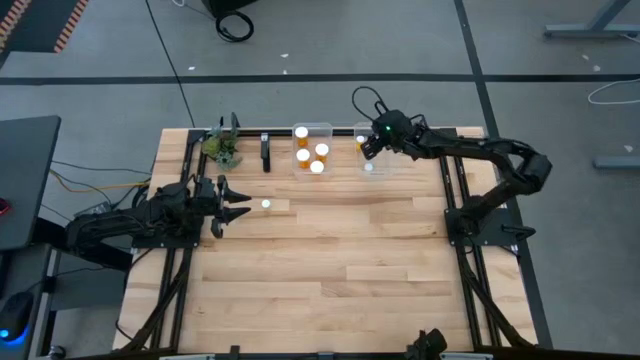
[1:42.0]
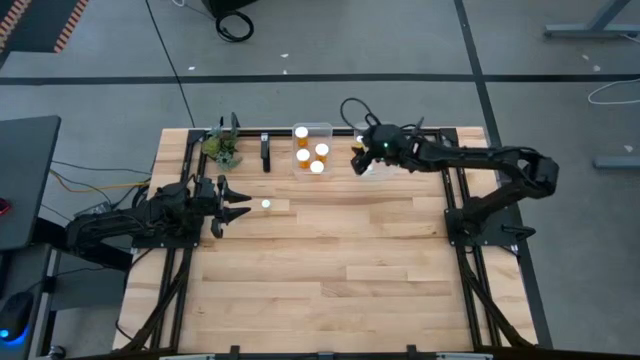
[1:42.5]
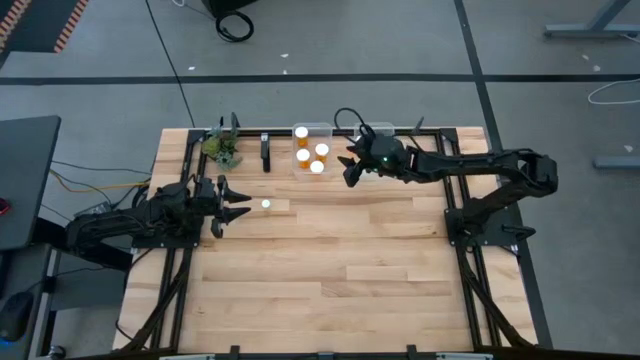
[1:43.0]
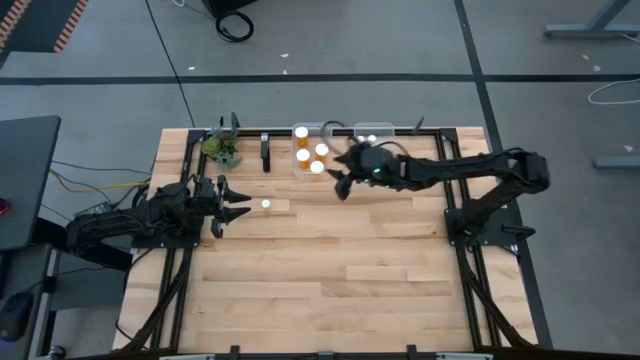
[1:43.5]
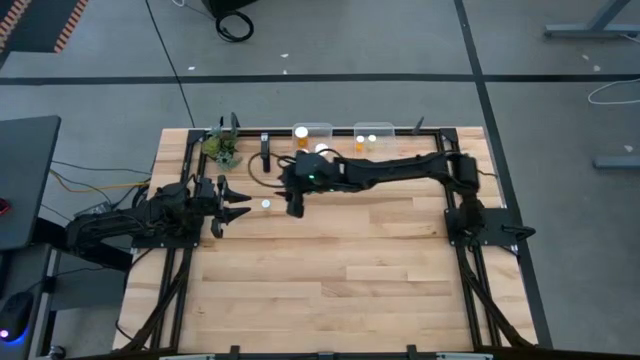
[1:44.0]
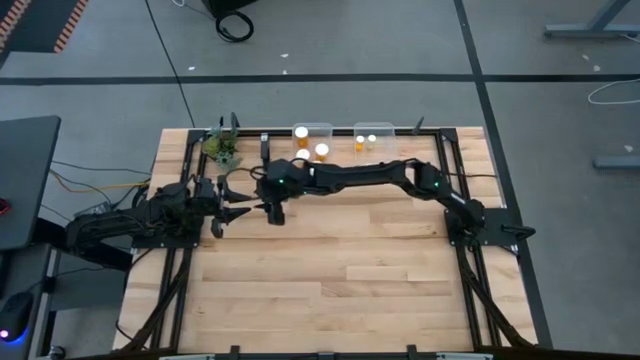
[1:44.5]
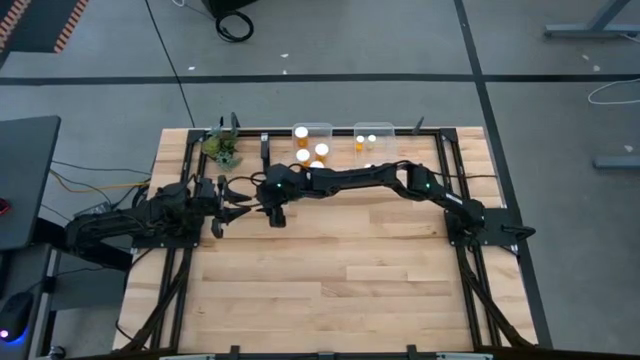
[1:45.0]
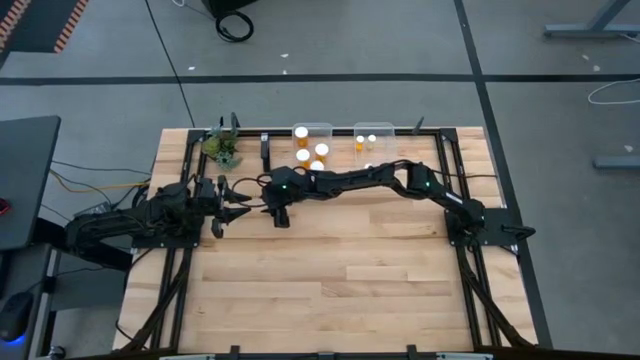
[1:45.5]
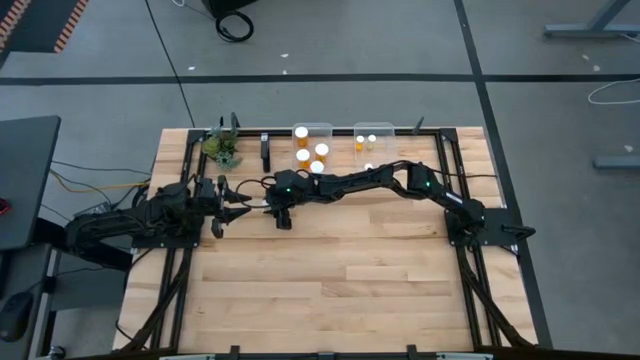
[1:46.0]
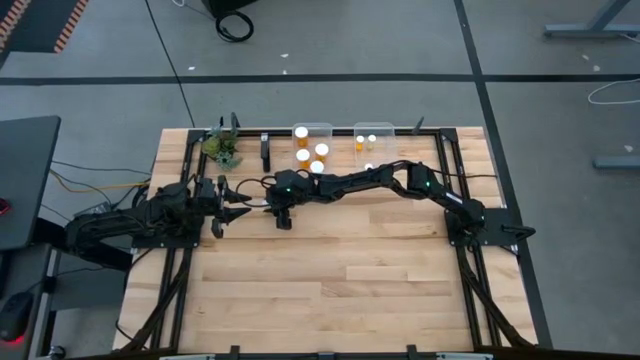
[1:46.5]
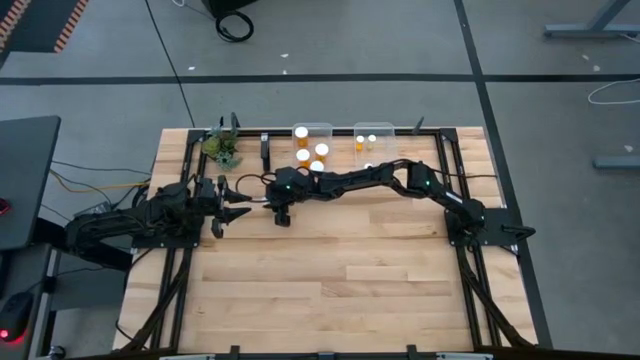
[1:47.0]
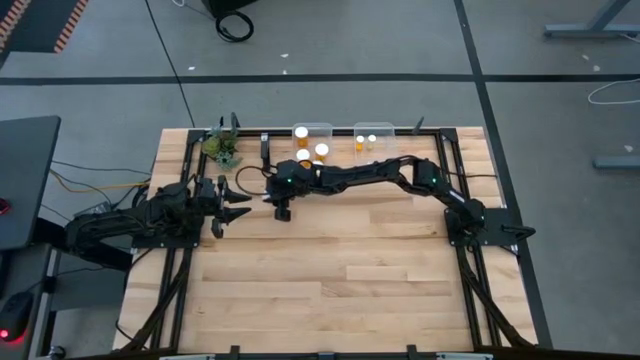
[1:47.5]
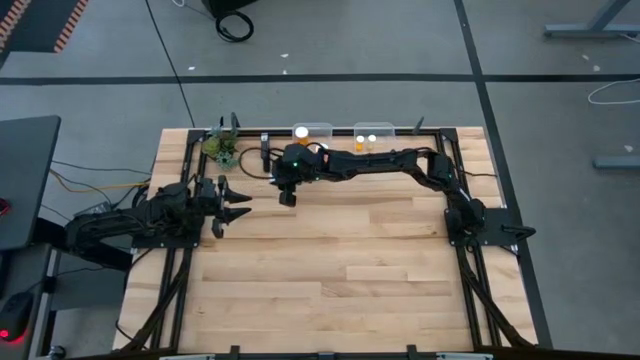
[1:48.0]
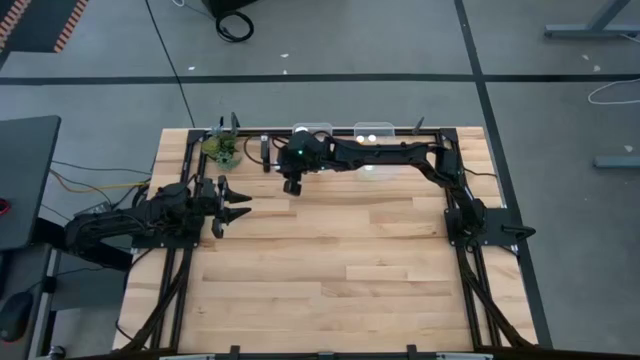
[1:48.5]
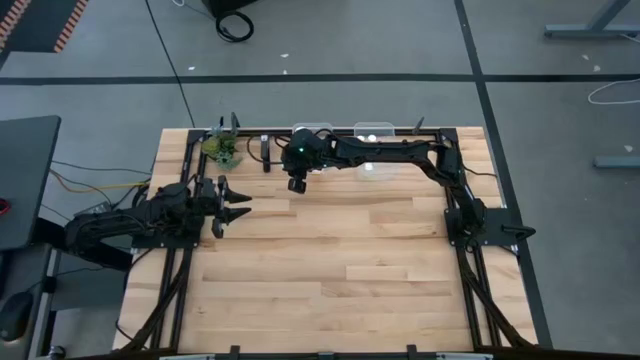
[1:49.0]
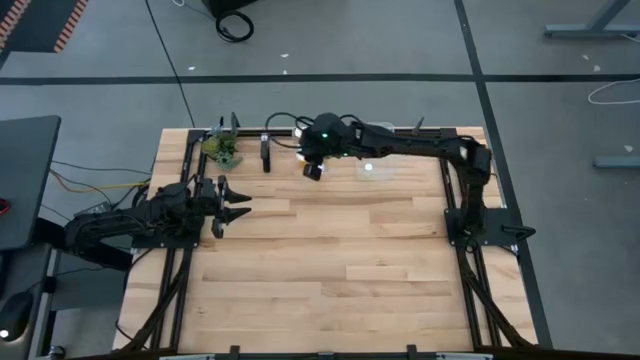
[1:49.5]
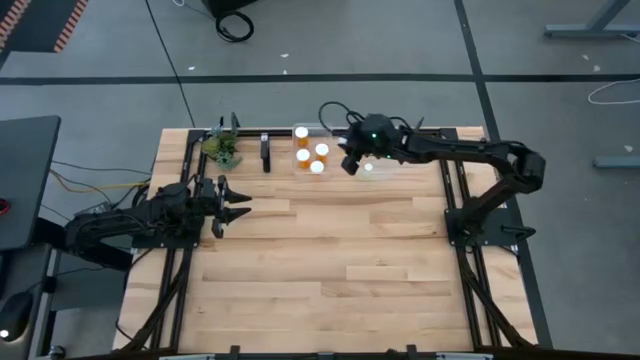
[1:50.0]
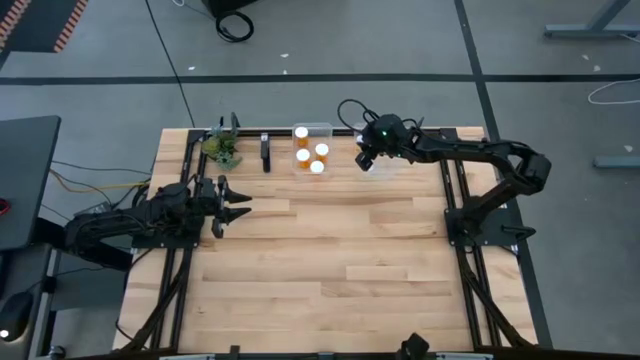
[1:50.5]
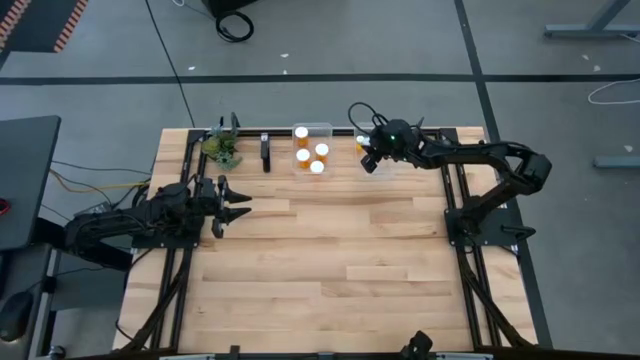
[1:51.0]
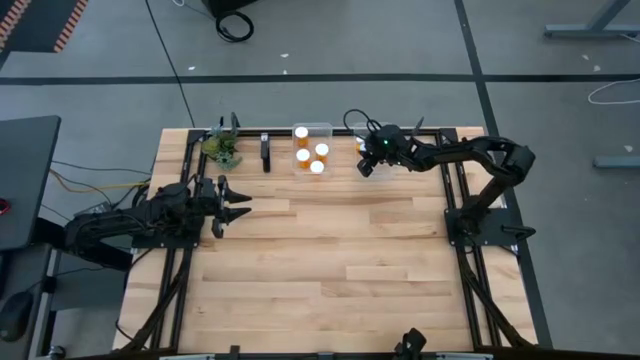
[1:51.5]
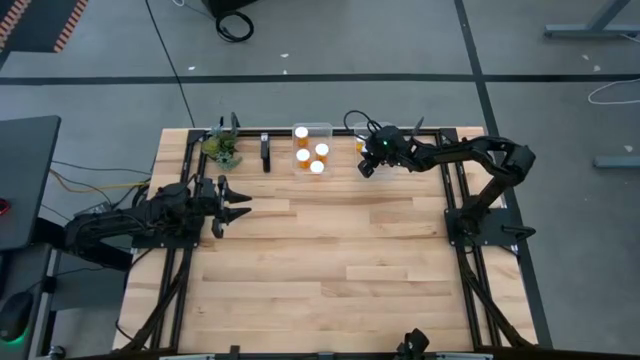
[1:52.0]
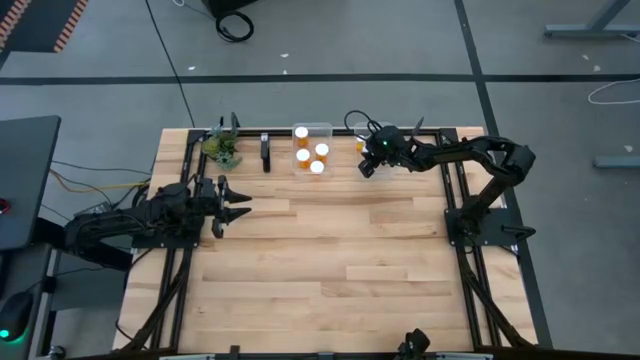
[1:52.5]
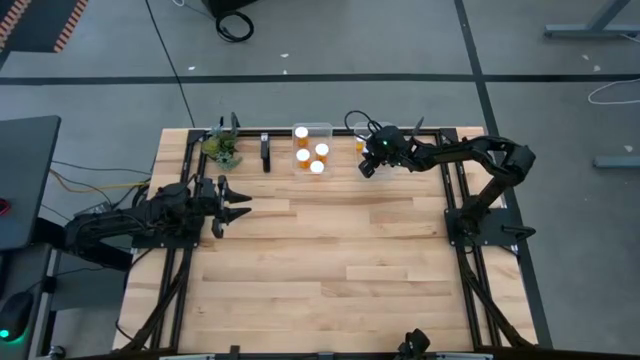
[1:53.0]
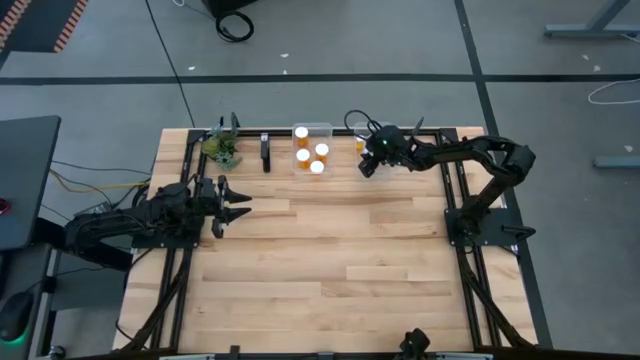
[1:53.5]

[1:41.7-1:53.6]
Task: Pick and place medicine bottles into bin by pill shape (circle, oval)
Put the small yellow pill bottle into the right transparent bin

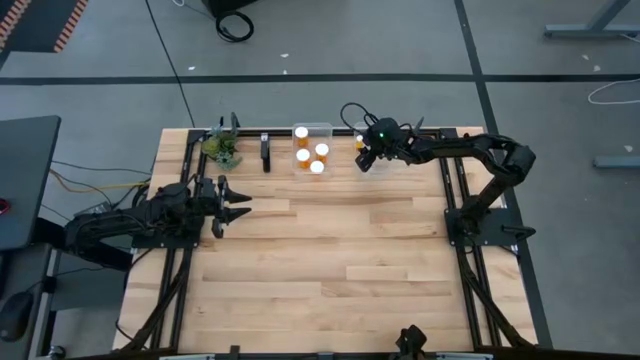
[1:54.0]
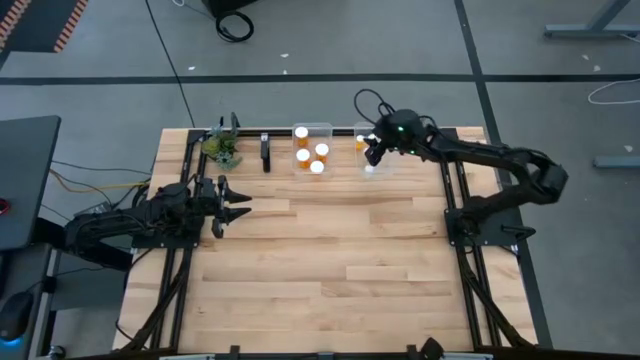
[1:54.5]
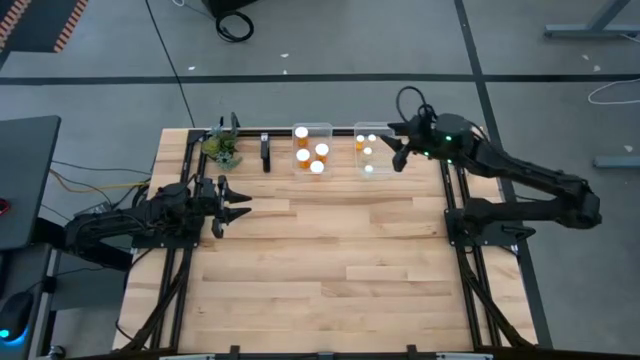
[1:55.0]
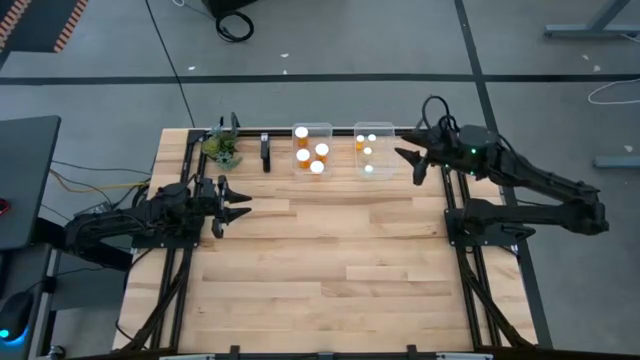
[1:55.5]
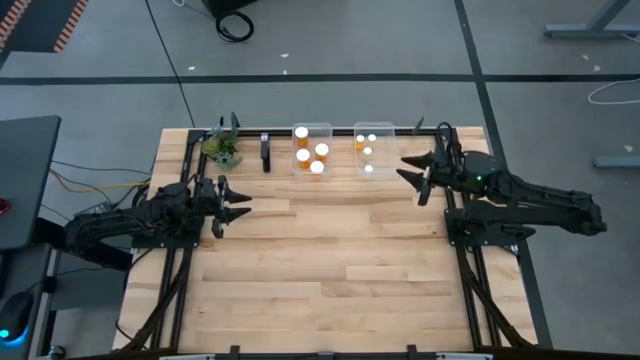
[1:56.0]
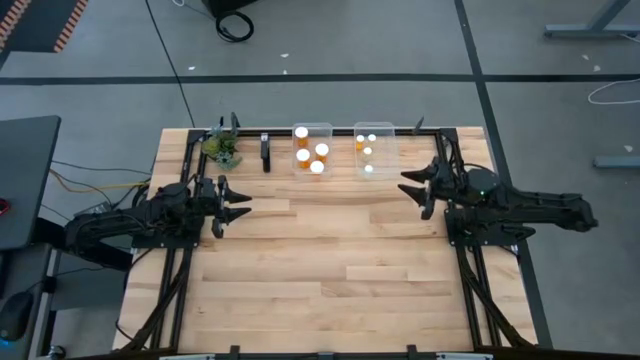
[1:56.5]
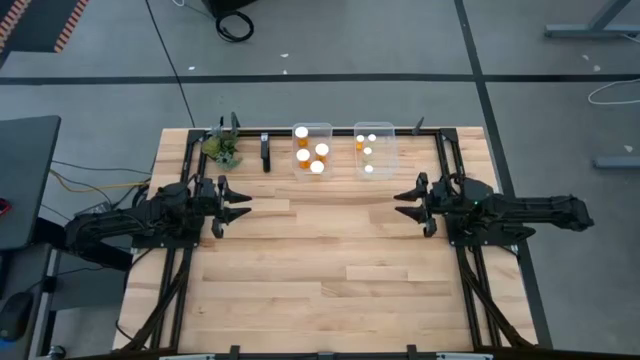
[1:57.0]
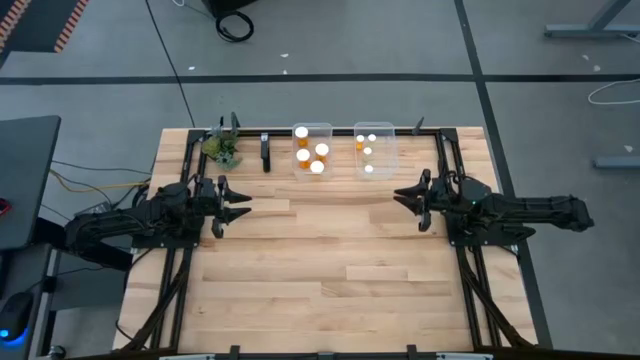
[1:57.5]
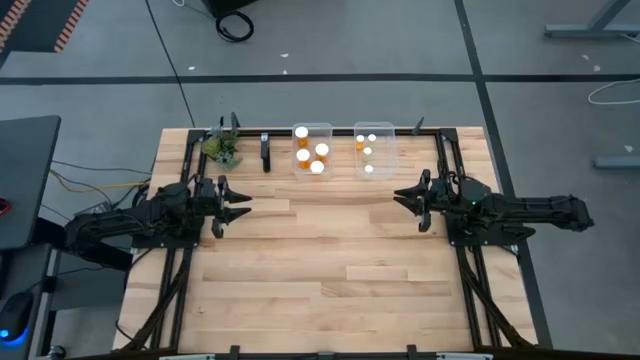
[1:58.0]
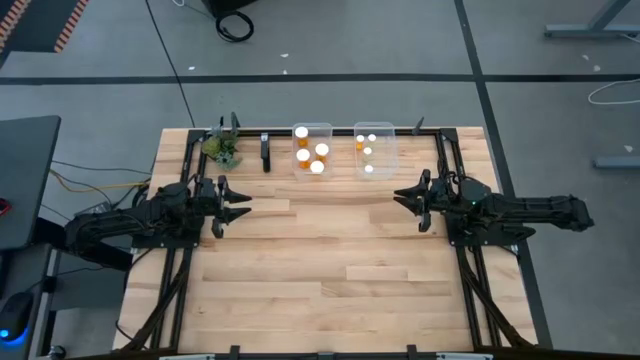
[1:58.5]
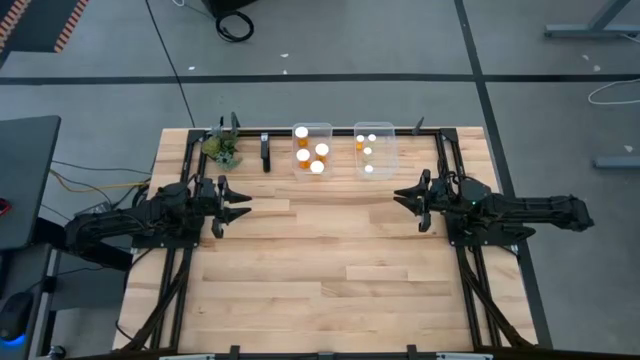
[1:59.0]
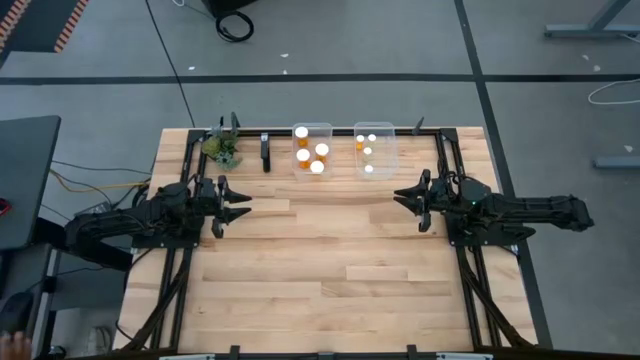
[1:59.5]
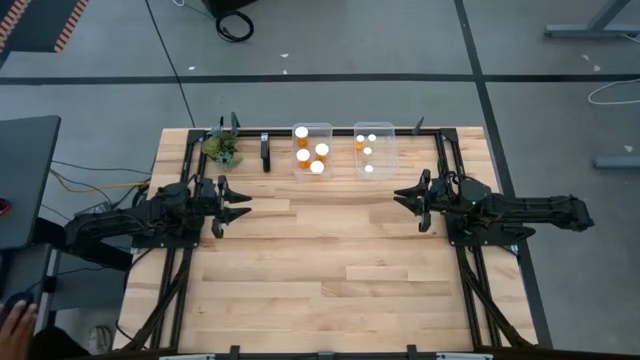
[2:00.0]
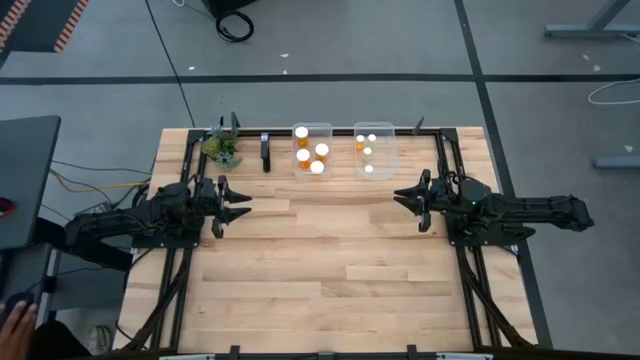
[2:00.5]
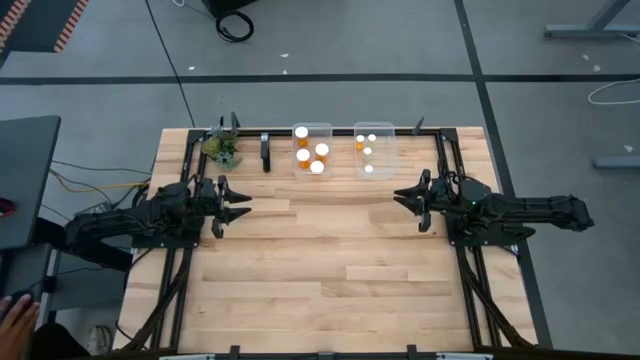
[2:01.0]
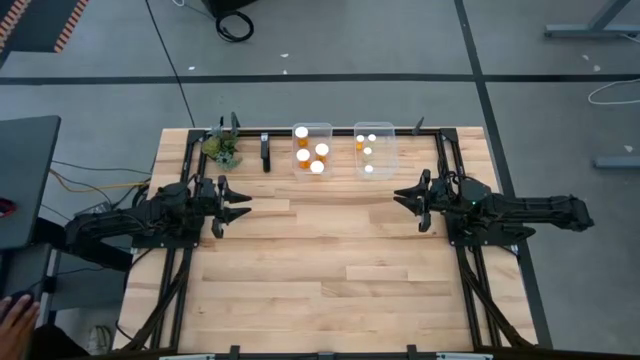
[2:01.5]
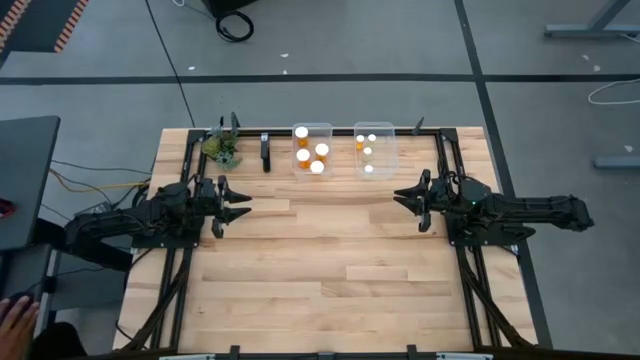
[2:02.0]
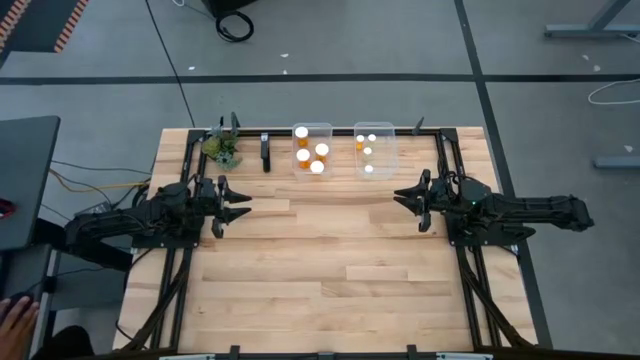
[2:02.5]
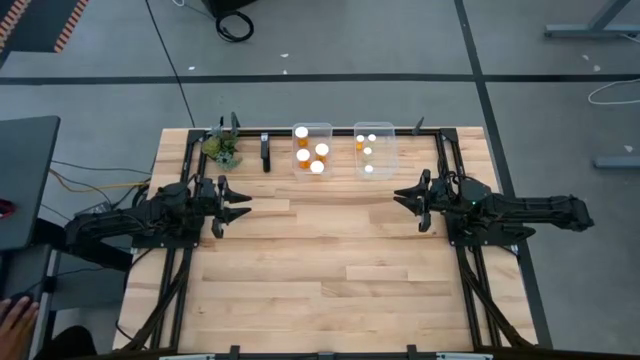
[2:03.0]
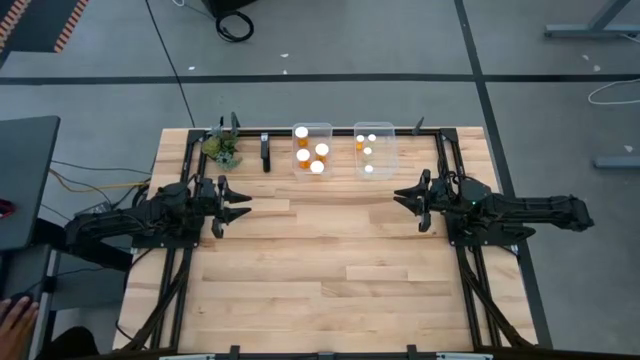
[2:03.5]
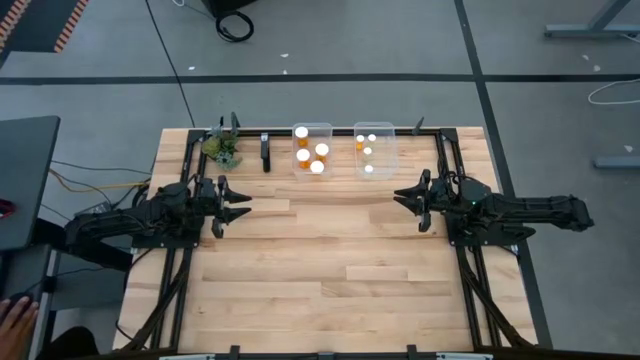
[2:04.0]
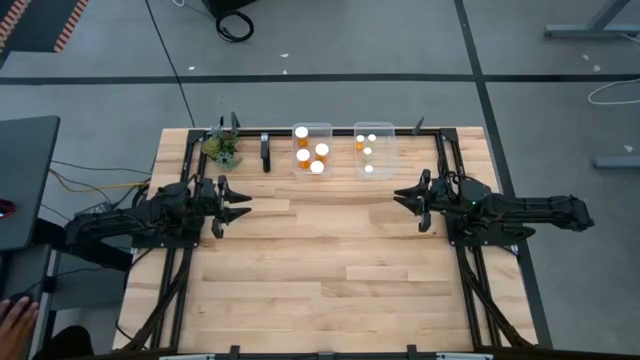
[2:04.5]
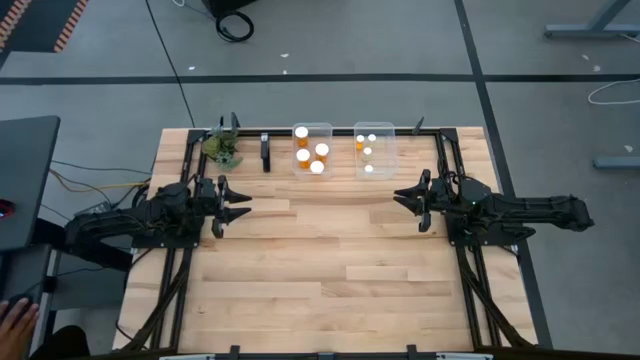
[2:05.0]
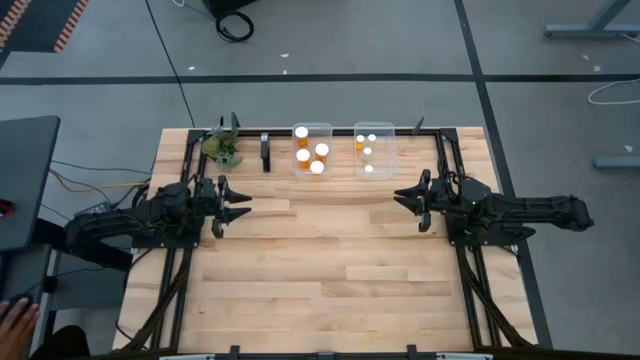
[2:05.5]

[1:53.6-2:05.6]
Return to Home Position
